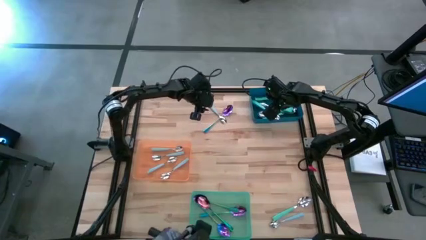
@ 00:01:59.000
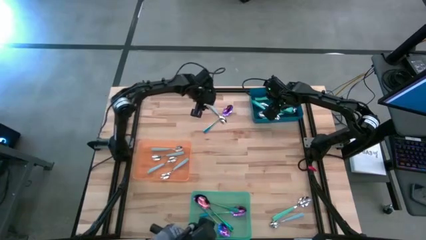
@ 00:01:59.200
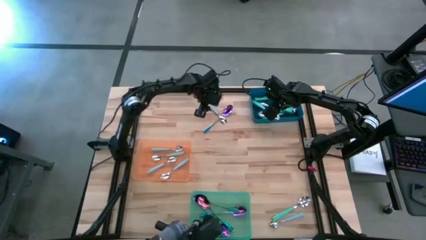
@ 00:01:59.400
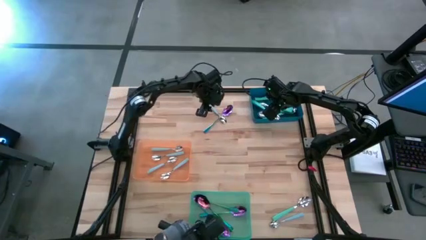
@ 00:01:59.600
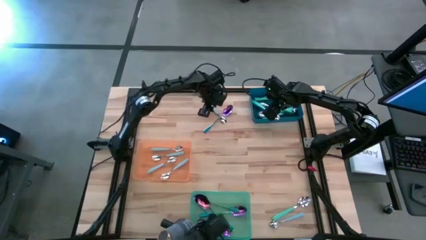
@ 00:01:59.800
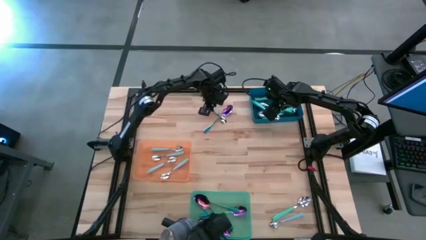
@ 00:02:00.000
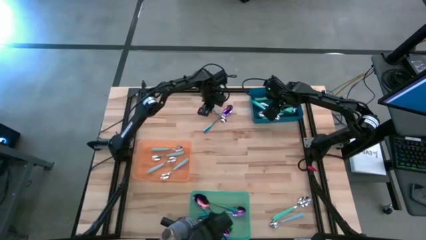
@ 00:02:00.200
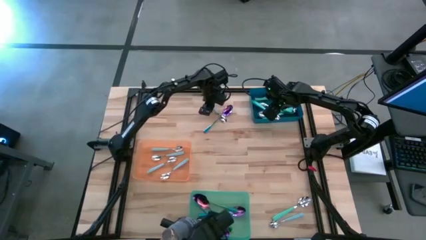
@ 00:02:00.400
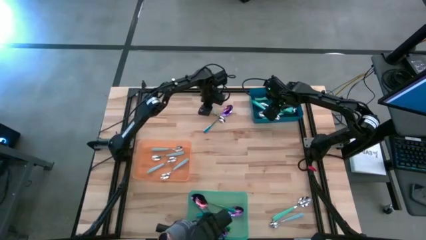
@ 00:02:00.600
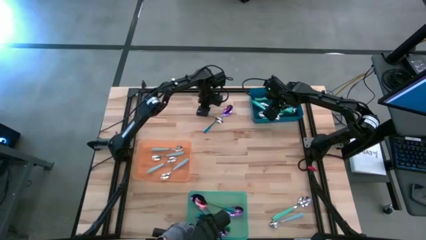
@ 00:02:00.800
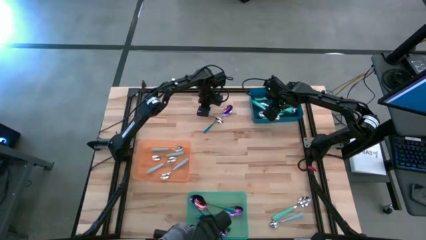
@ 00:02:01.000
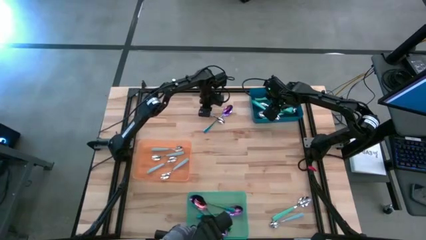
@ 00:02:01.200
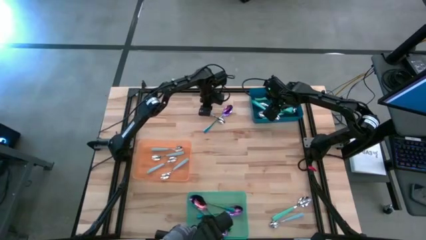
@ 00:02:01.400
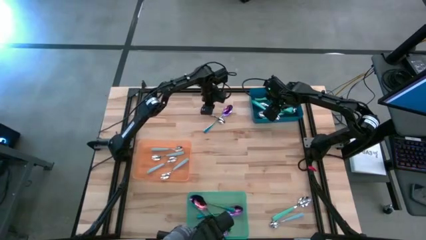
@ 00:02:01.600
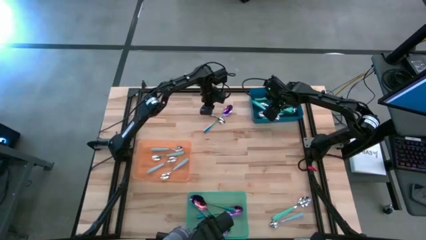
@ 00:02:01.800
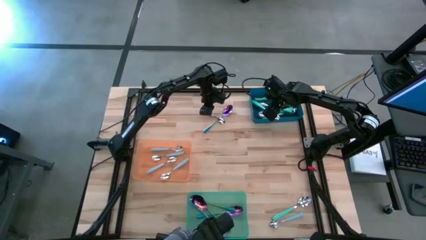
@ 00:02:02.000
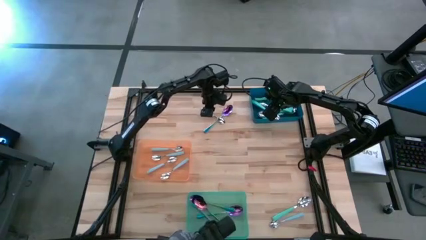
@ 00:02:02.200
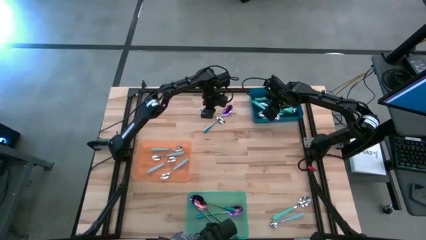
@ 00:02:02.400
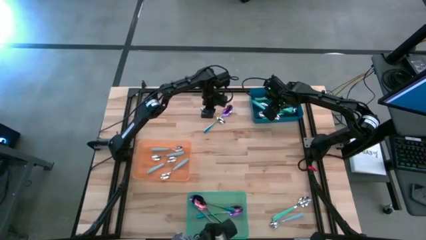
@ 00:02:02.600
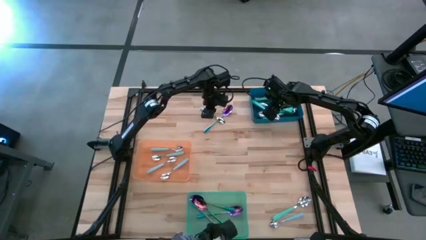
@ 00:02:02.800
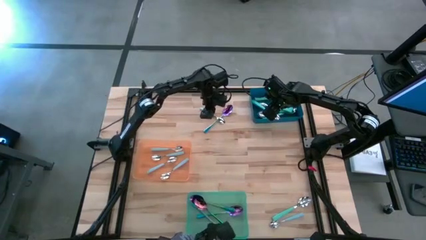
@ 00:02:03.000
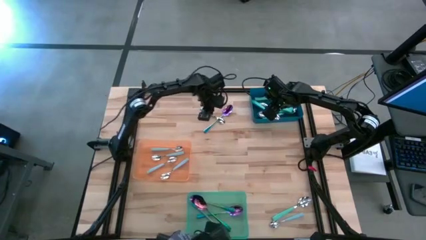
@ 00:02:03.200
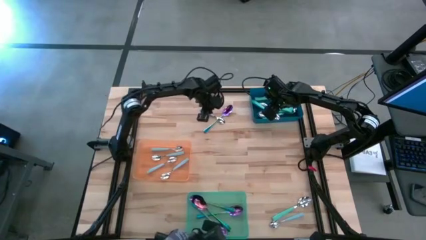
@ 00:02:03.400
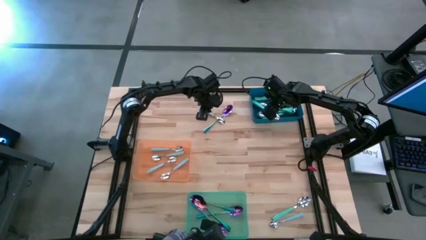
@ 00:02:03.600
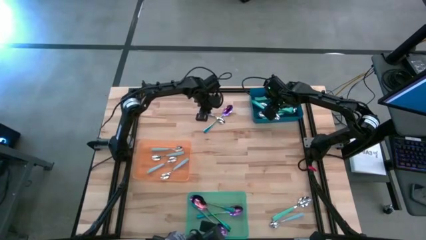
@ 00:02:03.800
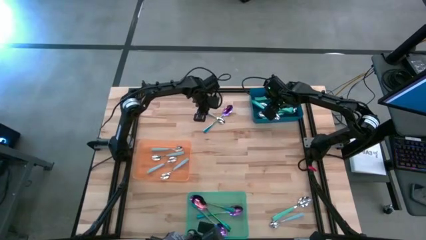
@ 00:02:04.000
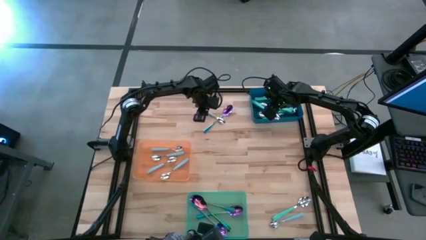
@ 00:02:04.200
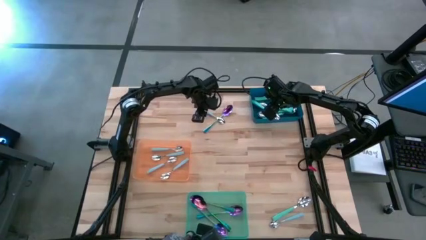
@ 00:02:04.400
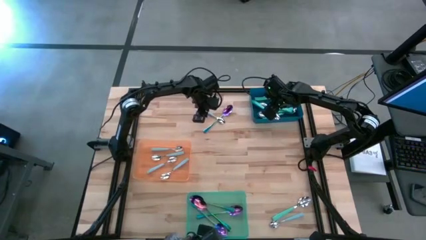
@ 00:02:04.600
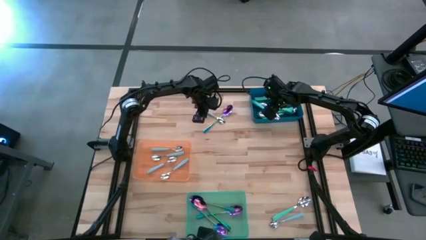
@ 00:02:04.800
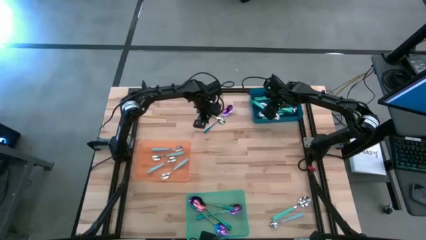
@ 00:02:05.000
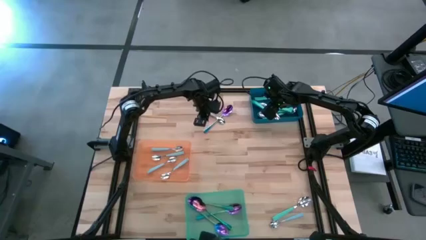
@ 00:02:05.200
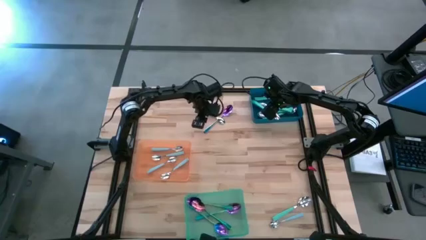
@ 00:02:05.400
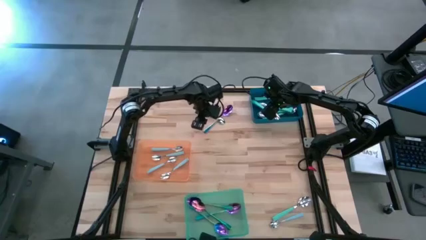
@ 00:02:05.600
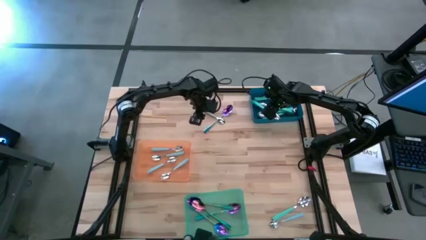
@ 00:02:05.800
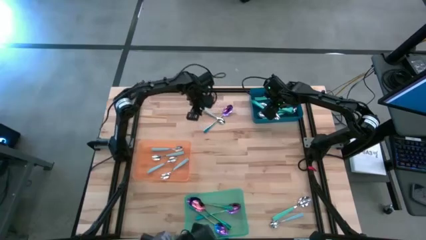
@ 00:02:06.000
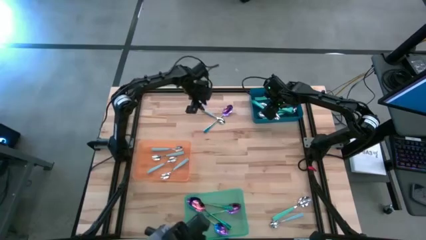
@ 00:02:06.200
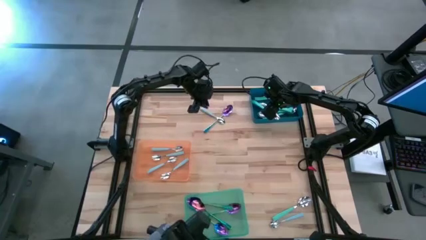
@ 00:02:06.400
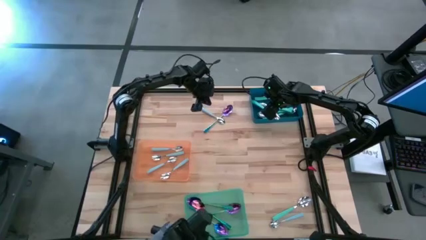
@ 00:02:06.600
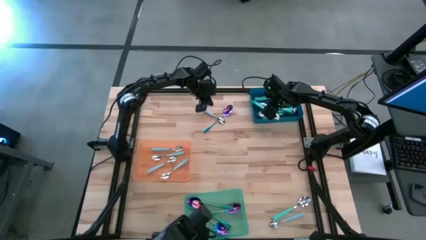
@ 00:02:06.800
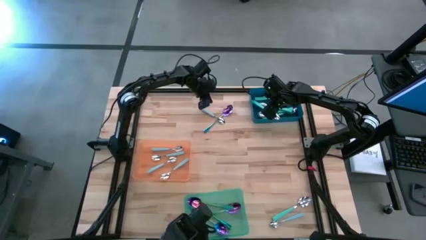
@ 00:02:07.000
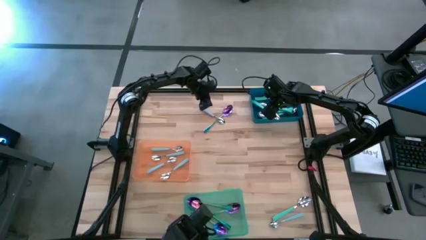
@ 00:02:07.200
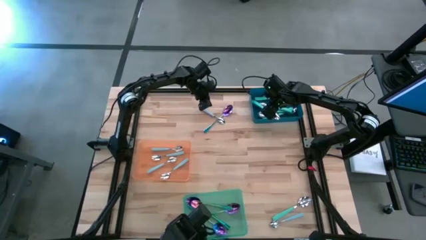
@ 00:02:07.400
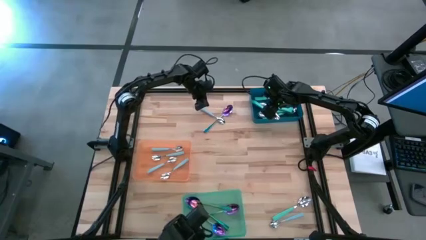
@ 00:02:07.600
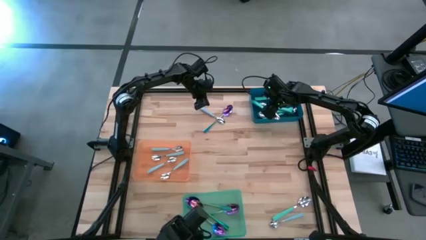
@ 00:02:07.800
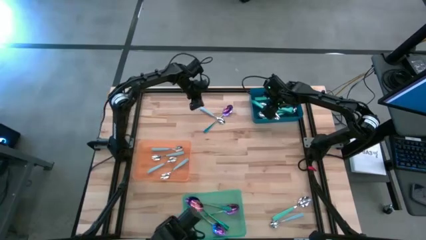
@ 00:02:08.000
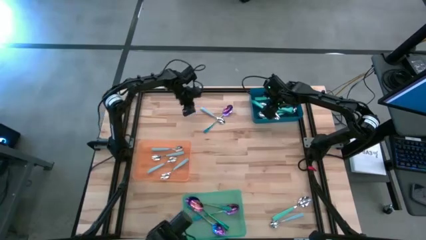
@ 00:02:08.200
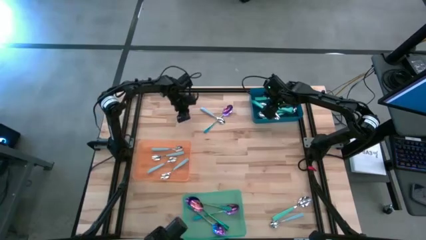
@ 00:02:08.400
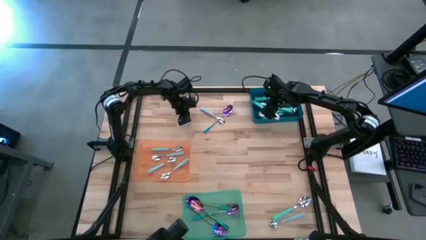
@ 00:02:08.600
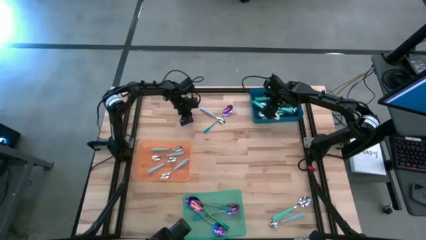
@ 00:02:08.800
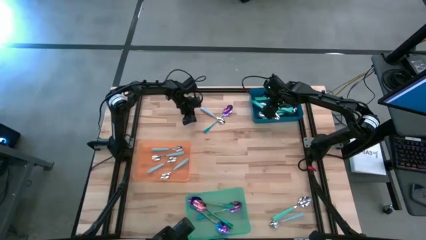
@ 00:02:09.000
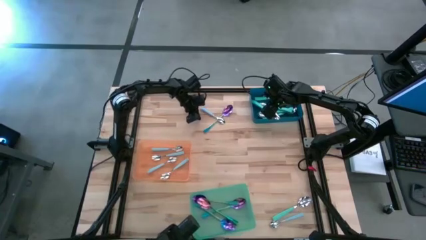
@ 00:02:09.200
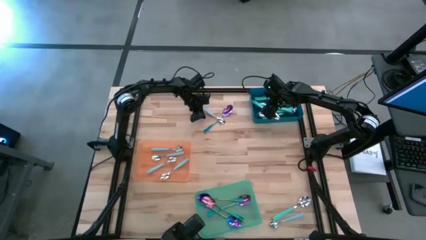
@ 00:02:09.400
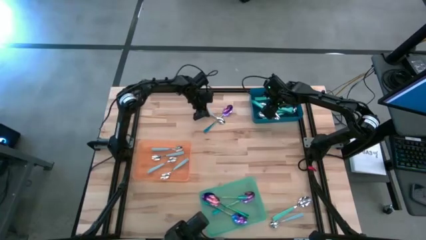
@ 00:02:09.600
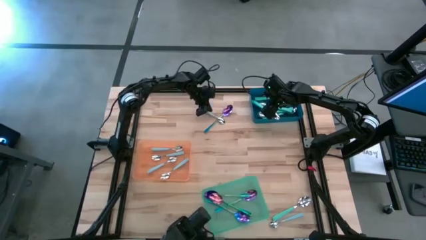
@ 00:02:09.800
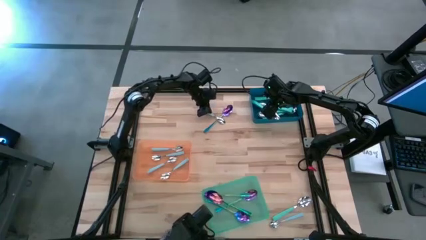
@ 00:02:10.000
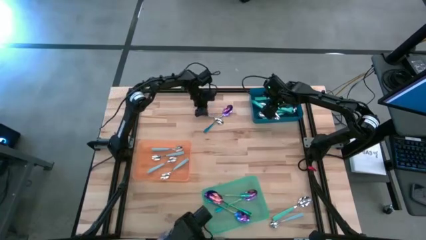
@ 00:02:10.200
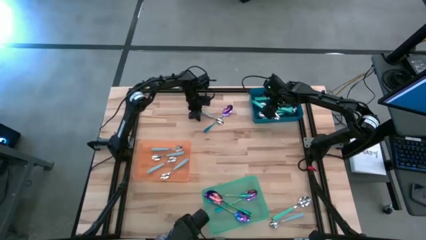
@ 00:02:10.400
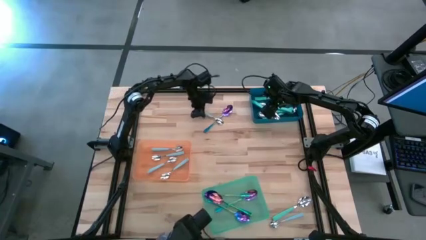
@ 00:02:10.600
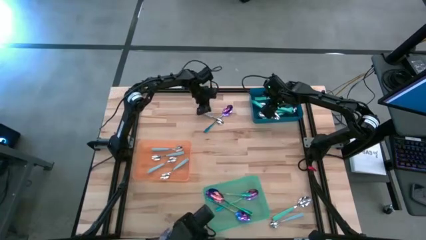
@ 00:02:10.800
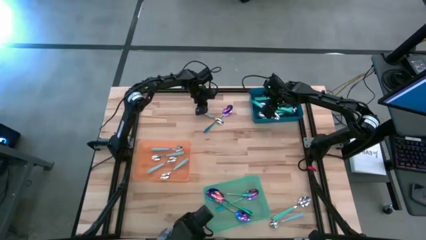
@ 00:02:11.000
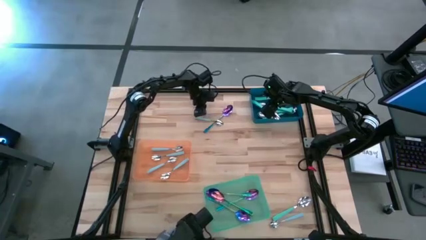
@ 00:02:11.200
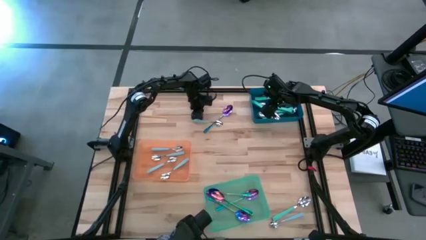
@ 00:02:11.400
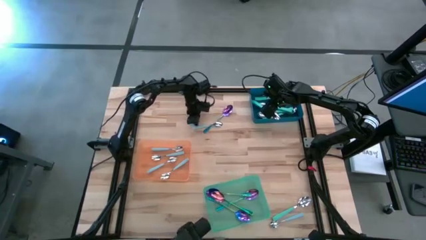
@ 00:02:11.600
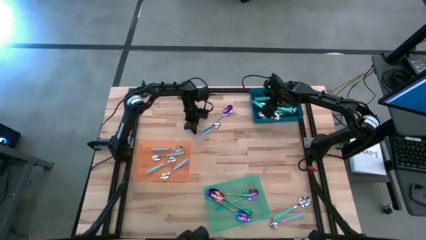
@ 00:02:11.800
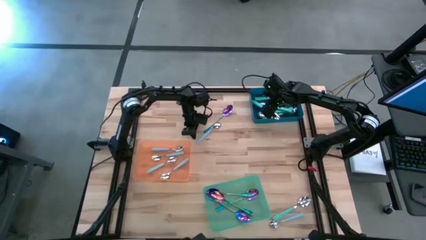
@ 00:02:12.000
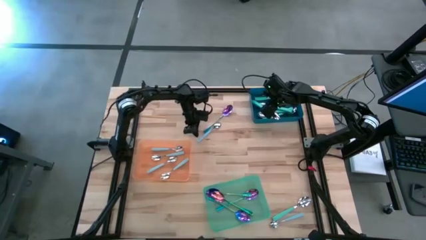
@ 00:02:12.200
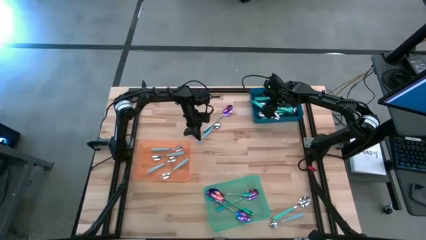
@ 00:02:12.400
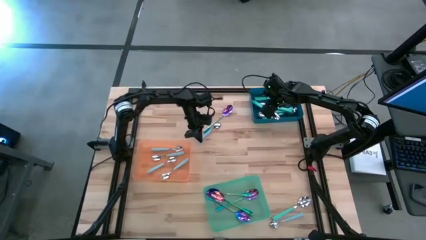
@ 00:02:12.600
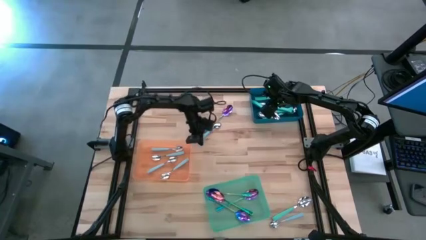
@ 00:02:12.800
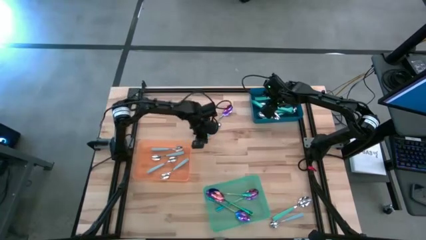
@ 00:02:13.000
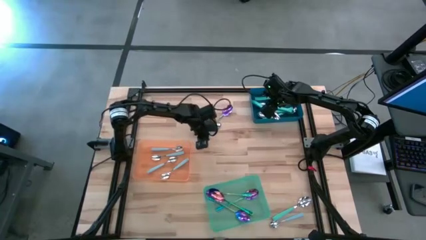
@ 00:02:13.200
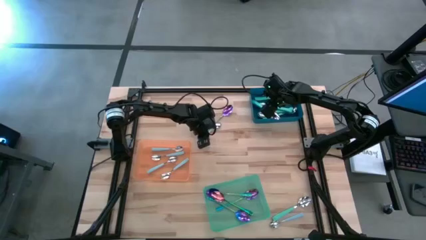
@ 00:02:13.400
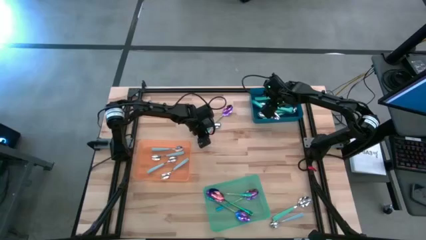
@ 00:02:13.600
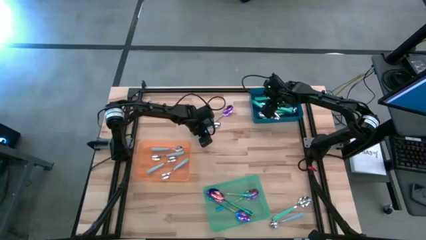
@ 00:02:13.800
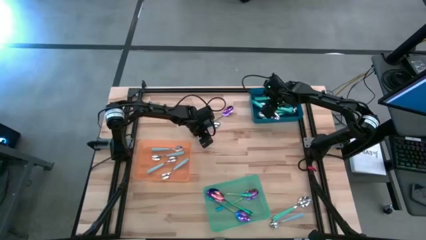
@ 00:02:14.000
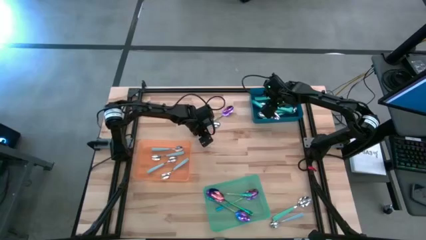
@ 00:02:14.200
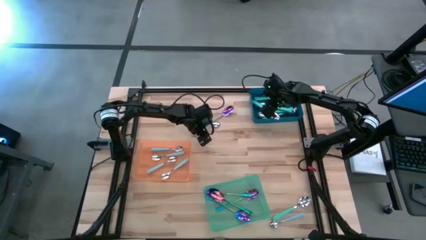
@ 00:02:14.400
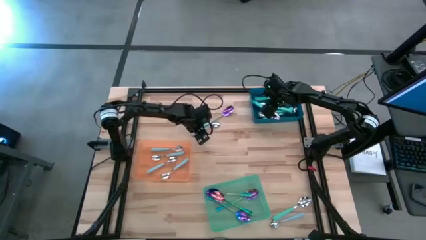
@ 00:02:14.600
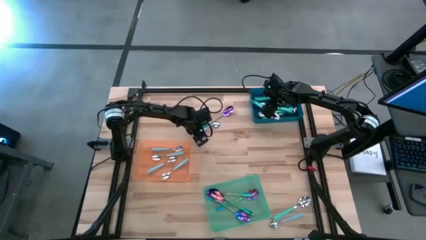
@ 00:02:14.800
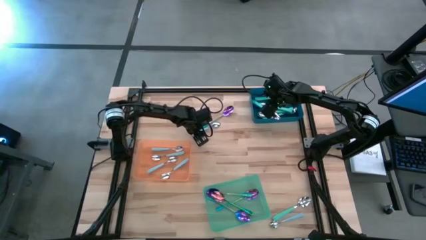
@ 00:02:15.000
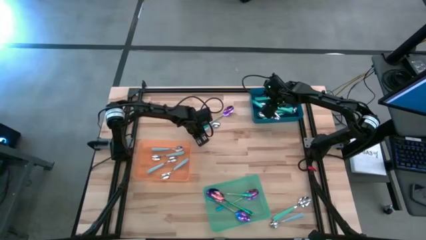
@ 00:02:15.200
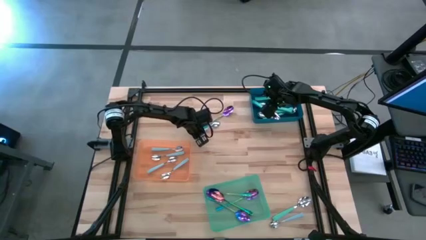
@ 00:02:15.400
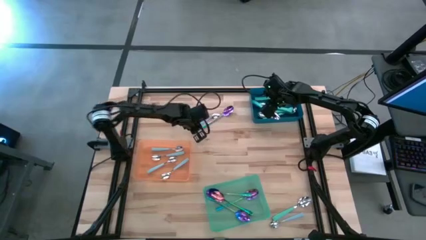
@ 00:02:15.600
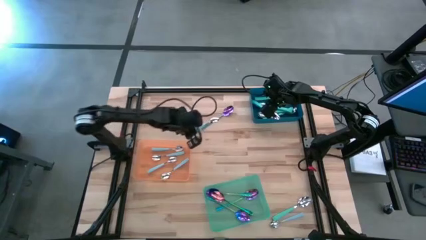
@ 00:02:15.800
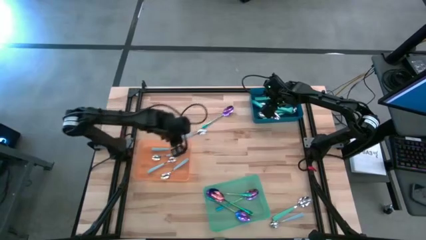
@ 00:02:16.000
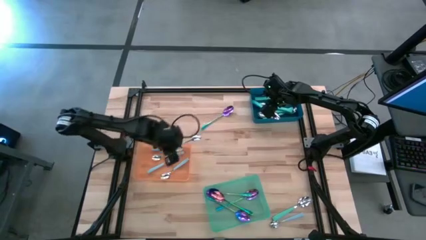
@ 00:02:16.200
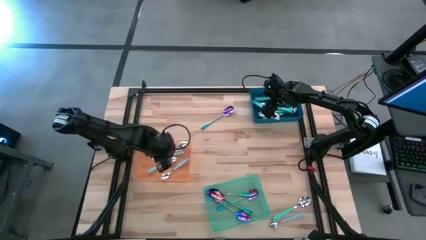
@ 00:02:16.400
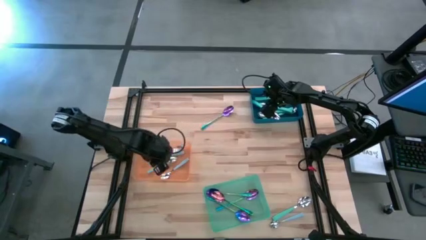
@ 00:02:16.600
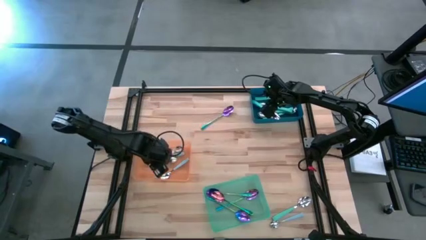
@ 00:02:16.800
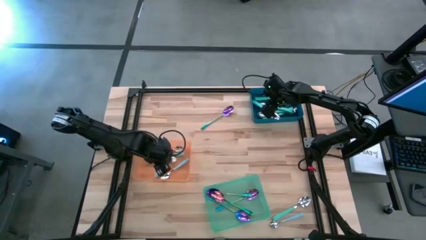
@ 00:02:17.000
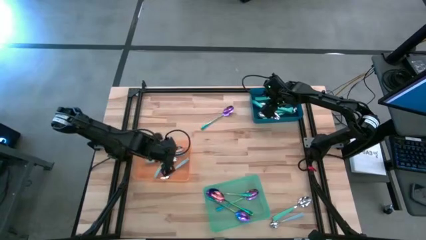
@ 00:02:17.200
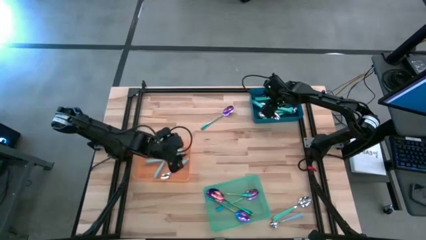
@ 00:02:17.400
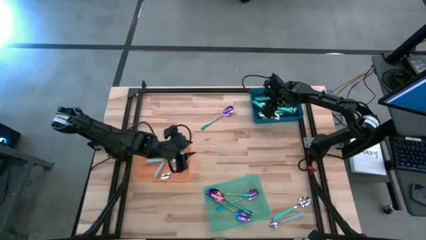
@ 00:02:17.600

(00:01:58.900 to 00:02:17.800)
Task: Sort silverware by color (type)
Put the top blue spoon into the orange bin
